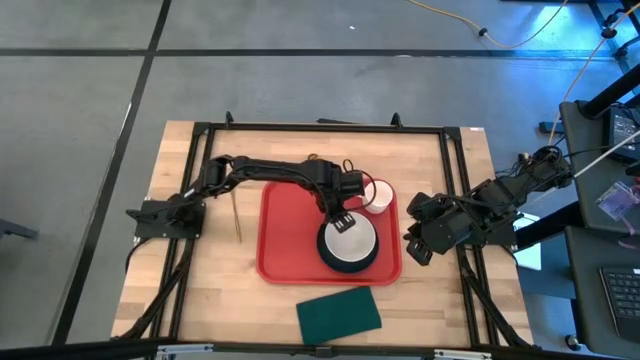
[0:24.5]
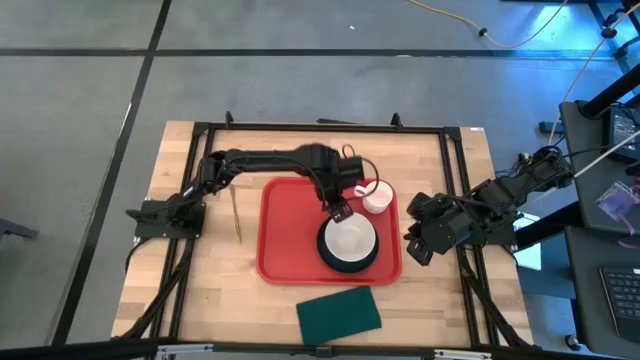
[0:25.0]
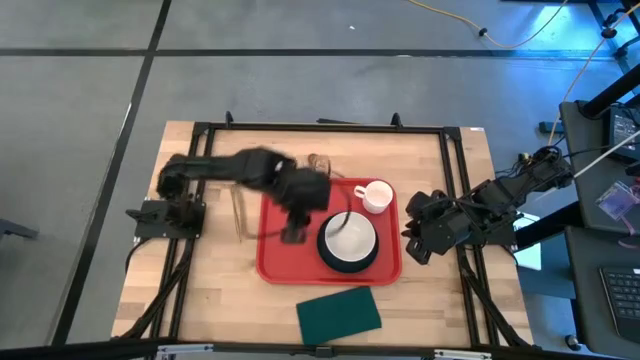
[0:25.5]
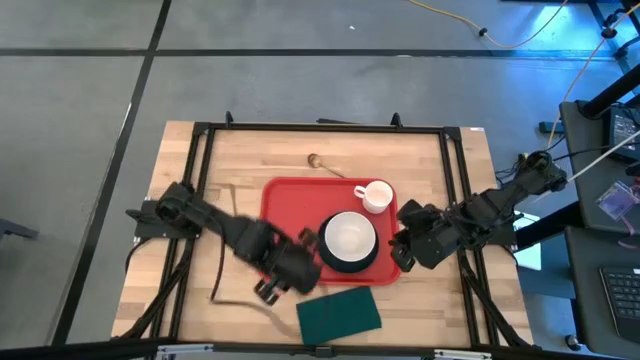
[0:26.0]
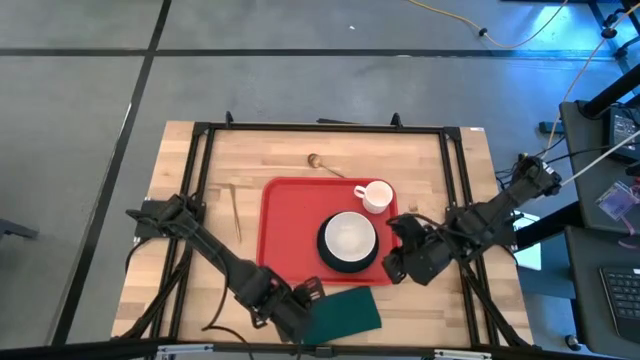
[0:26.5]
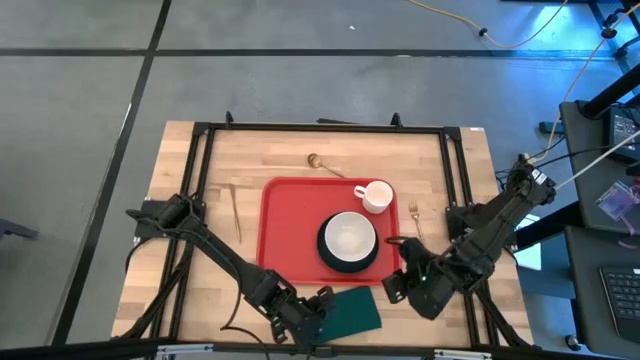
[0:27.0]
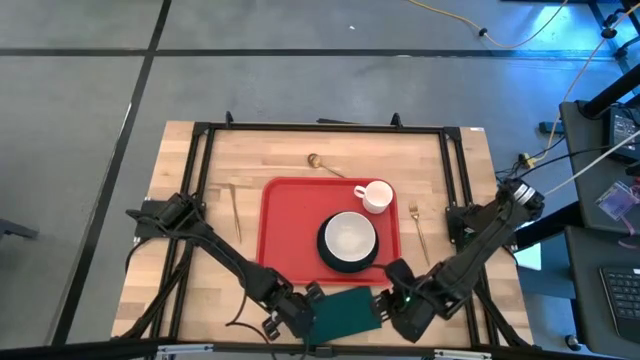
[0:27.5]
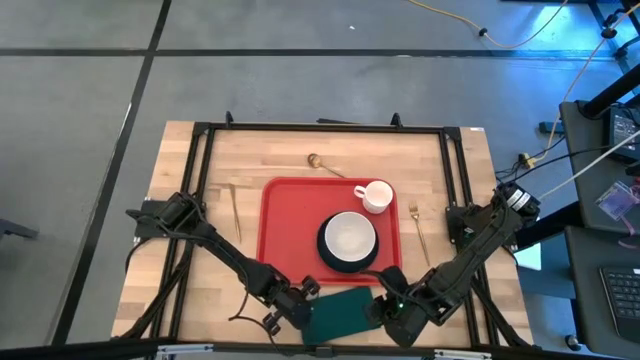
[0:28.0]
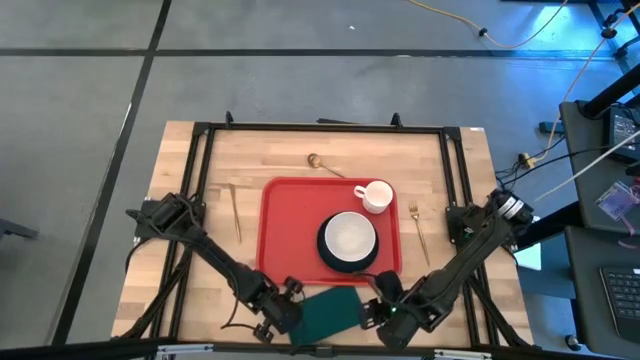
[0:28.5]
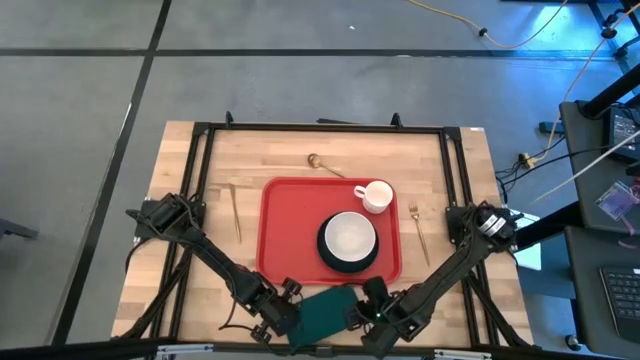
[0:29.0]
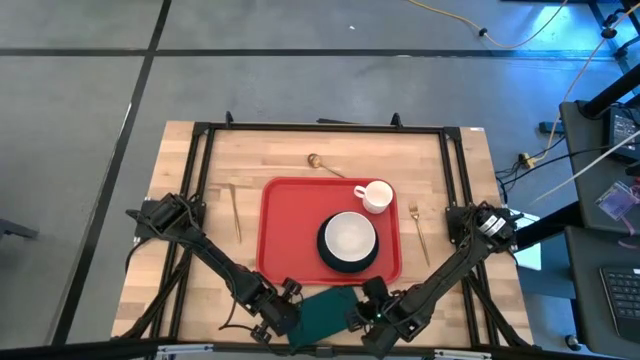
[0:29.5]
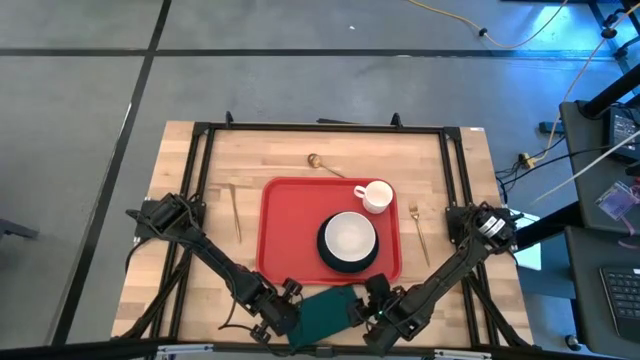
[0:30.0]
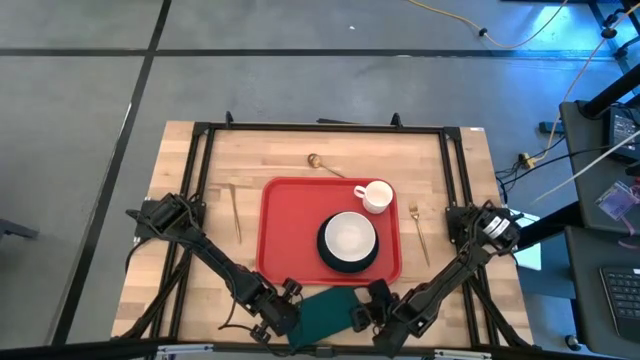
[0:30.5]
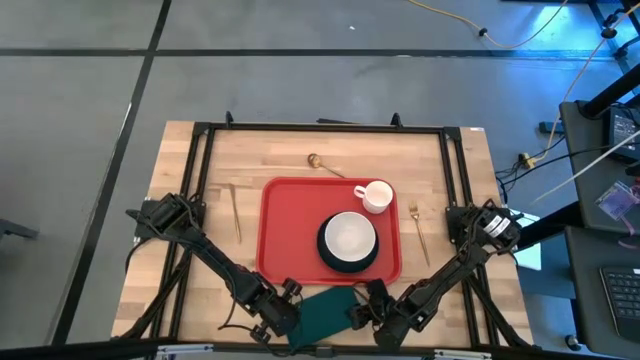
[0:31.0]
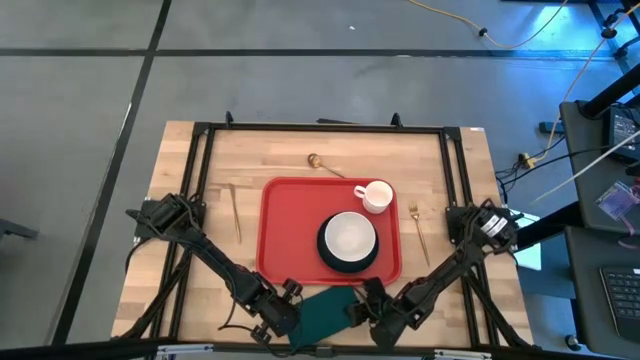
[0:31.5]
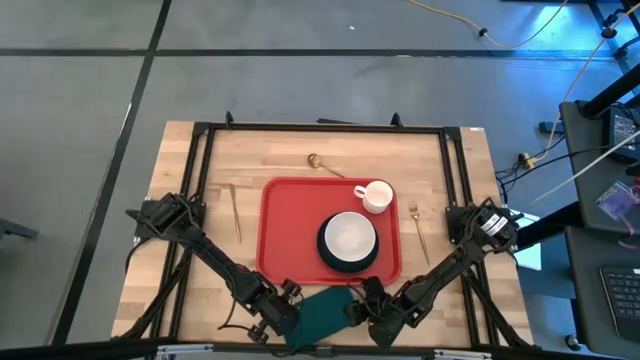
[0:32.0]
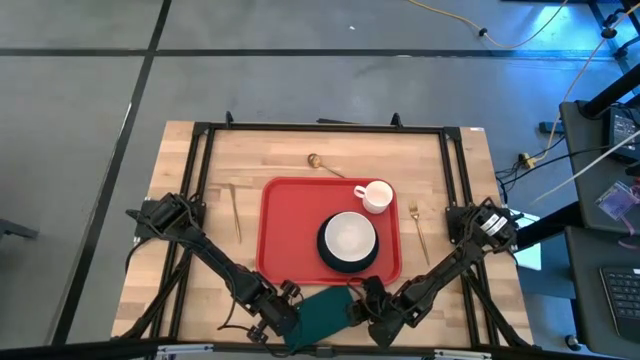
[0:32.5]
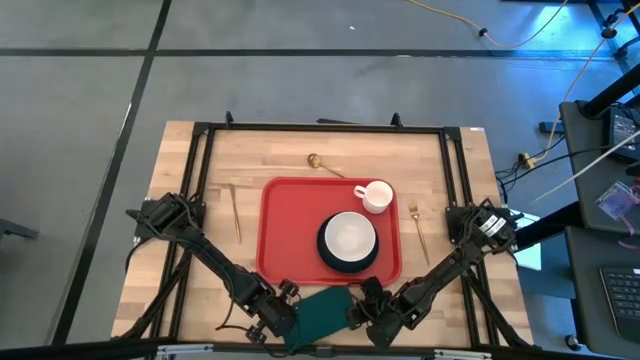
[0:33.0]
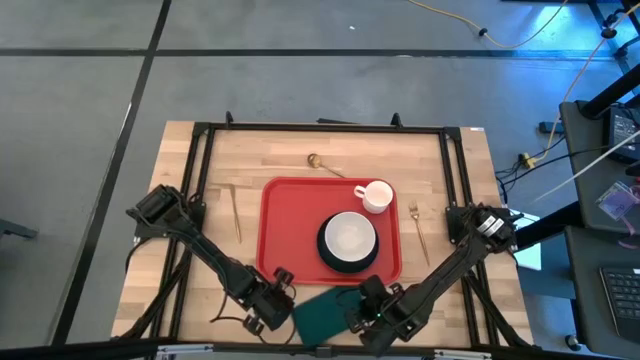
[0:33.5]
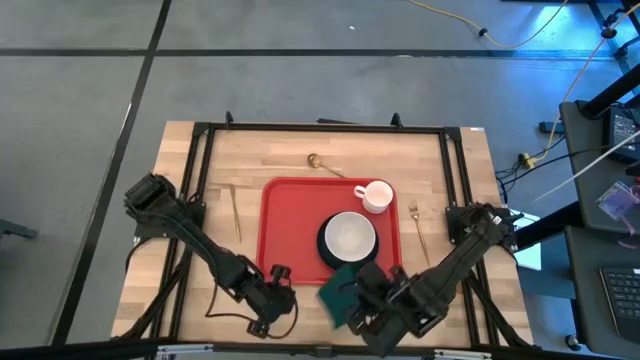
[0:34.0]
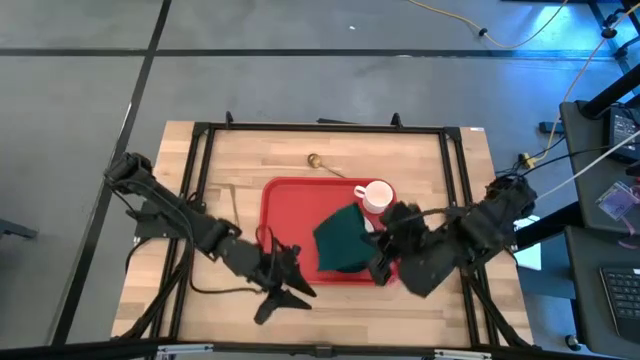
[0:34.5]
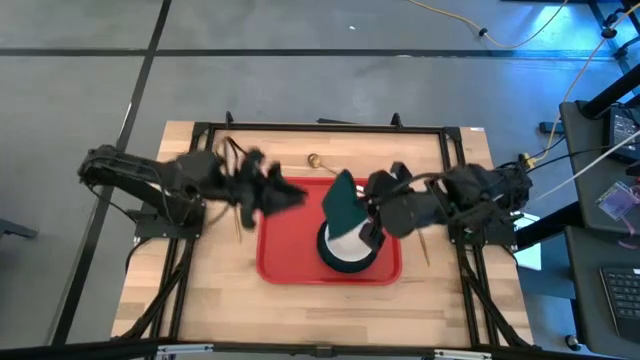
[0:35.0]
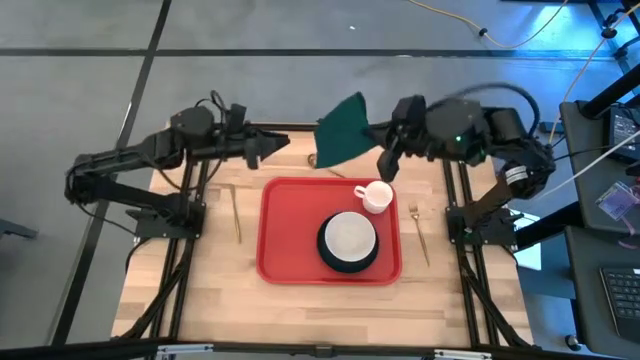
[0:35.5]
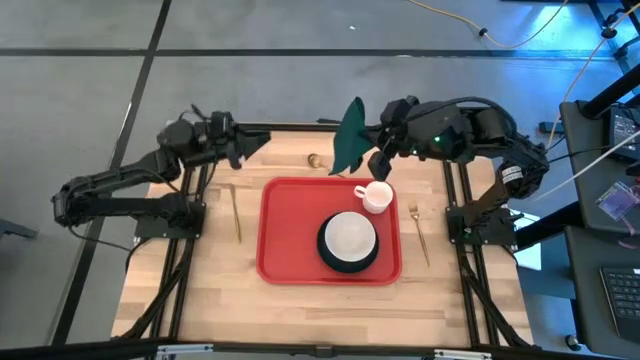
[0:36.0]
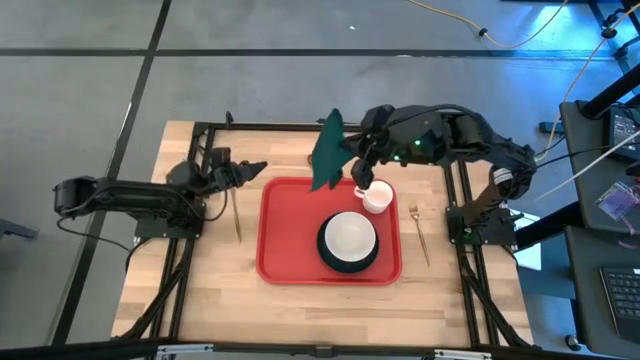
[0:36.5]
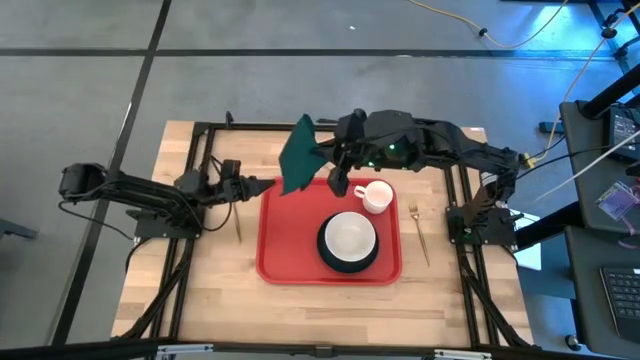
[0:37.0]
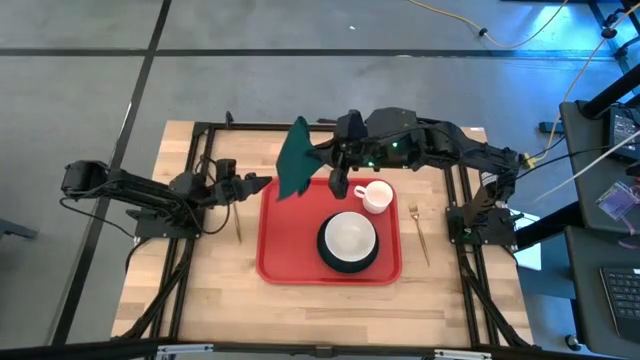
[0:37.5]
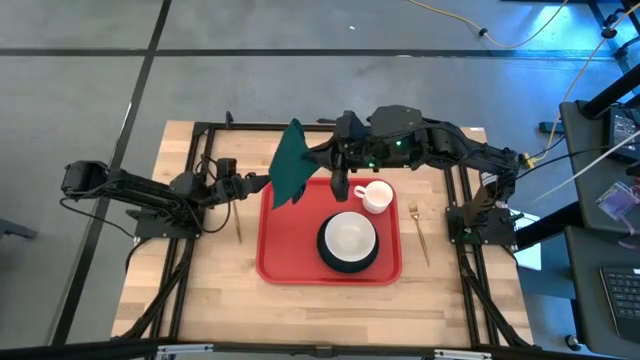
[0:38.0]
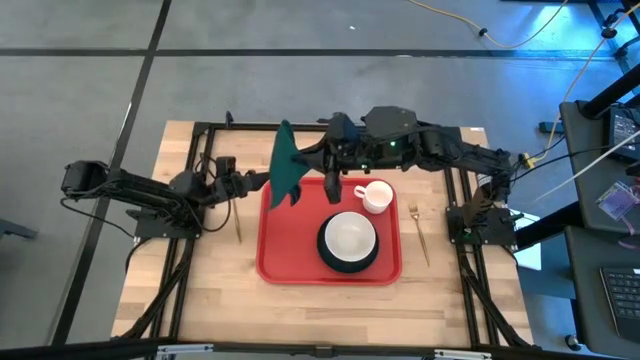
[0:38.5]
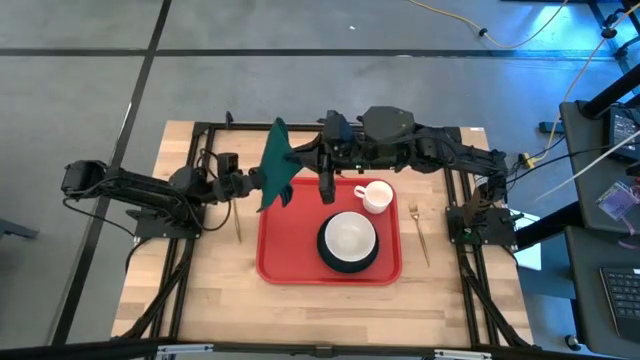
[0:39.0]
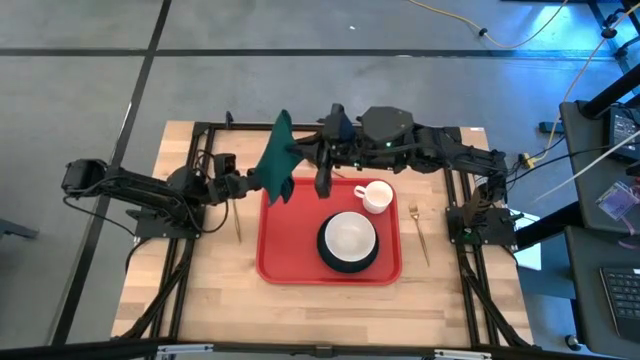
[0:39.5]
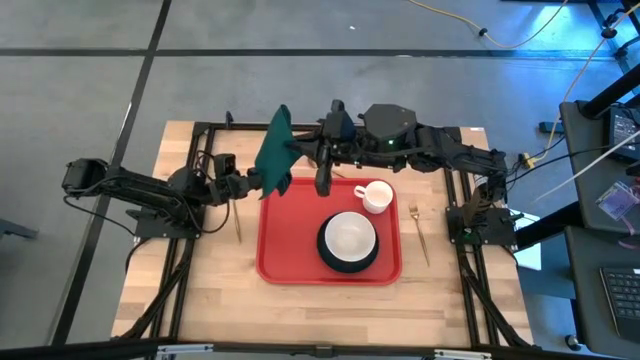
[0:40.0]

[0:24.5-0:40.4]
Task: Set up tray
Put the dark green napkin on the orange tray to the left of the black plate

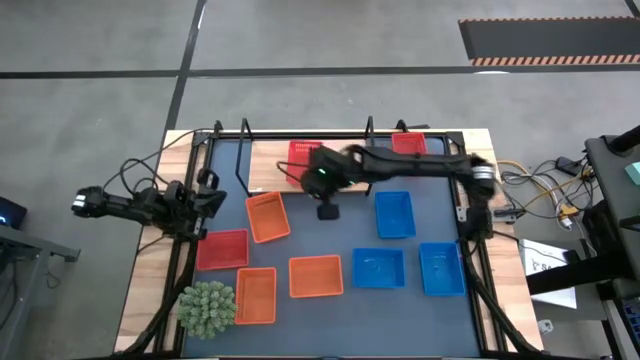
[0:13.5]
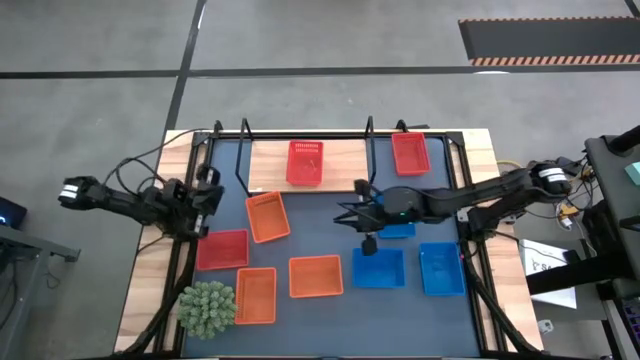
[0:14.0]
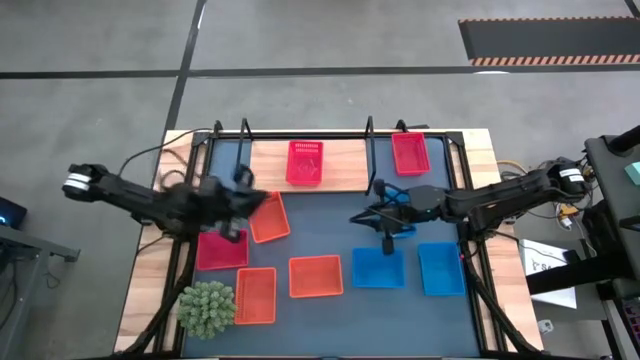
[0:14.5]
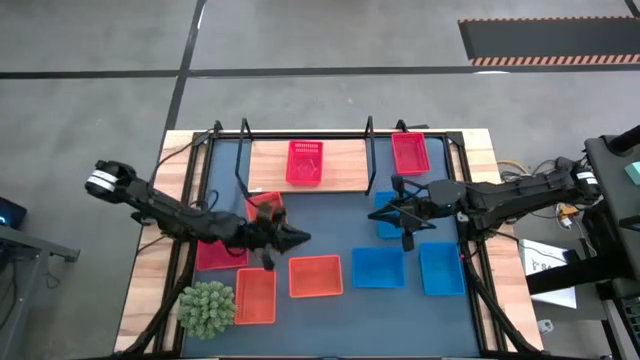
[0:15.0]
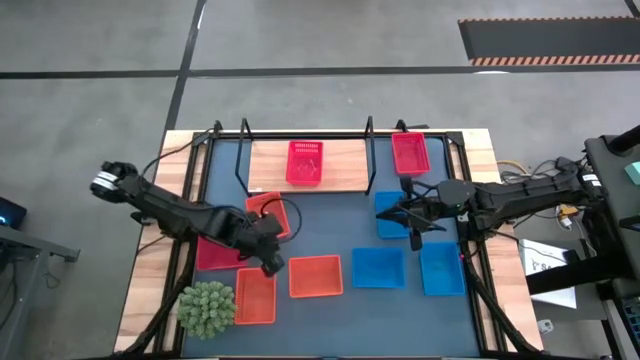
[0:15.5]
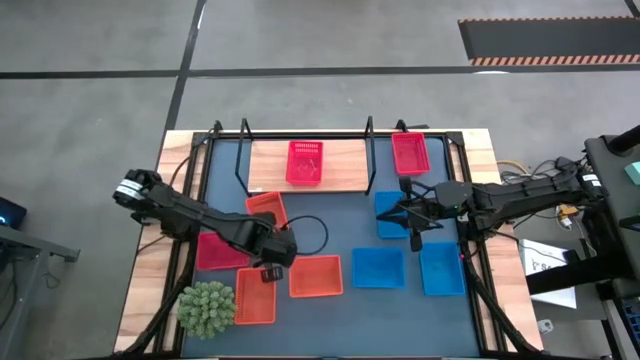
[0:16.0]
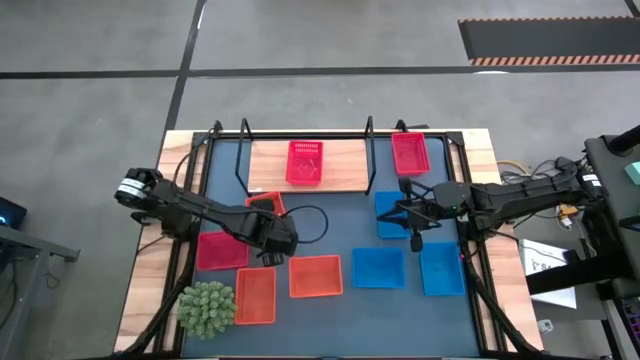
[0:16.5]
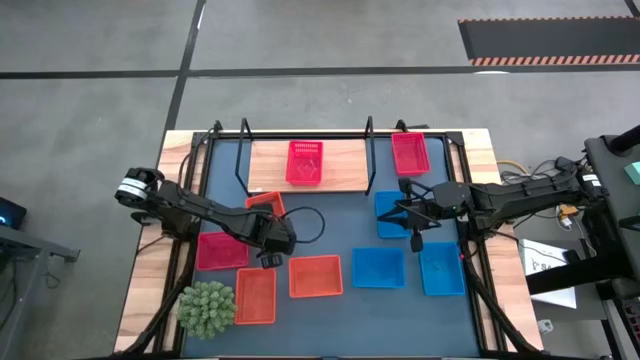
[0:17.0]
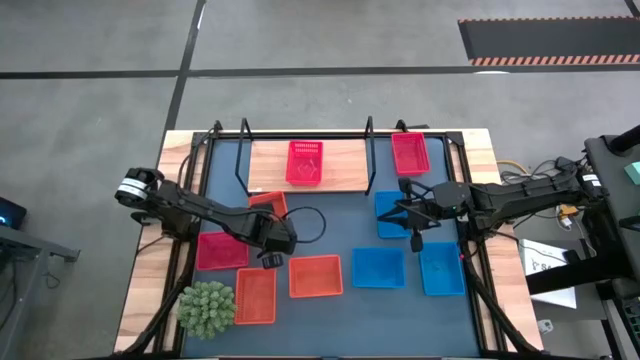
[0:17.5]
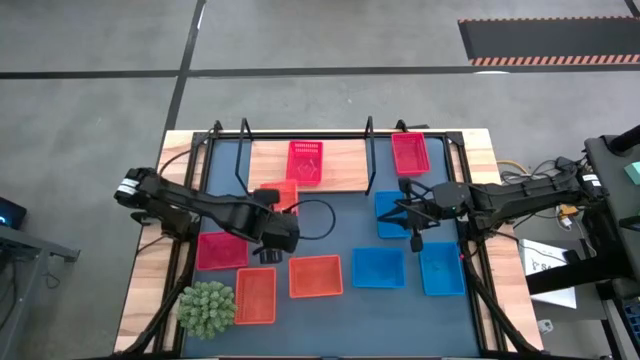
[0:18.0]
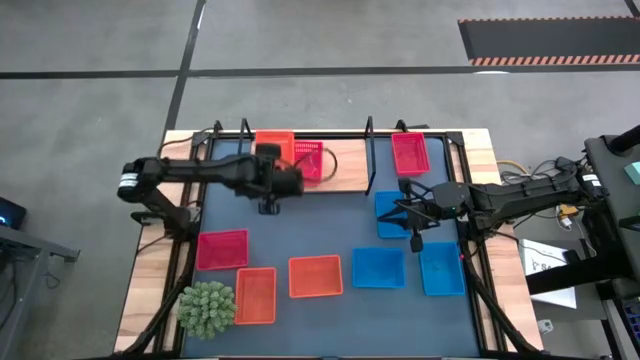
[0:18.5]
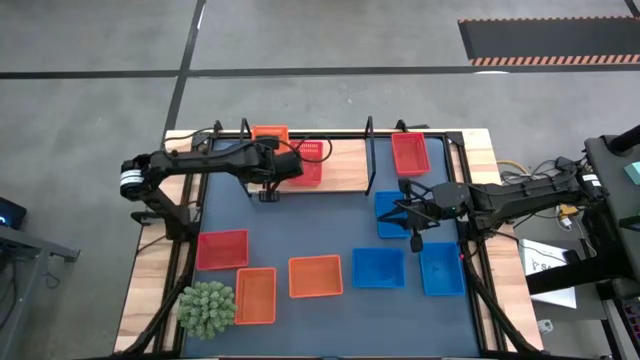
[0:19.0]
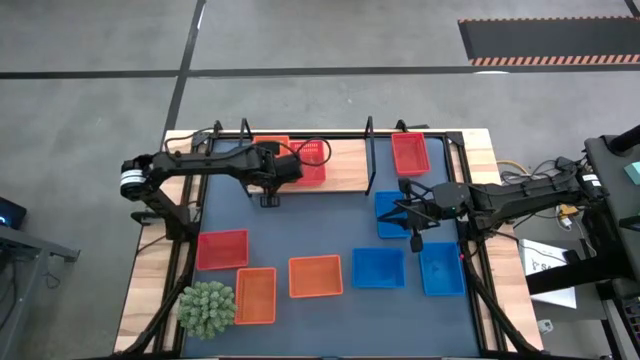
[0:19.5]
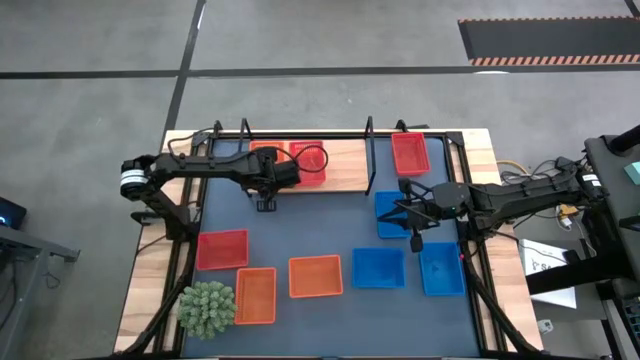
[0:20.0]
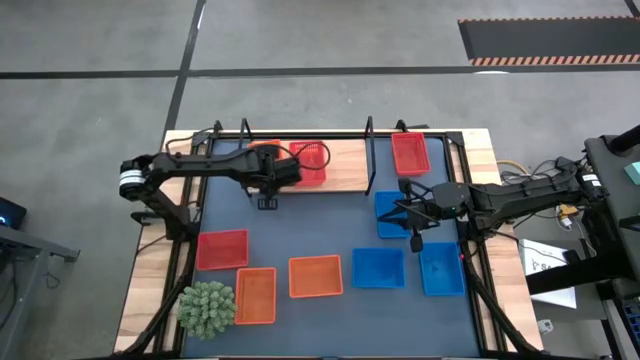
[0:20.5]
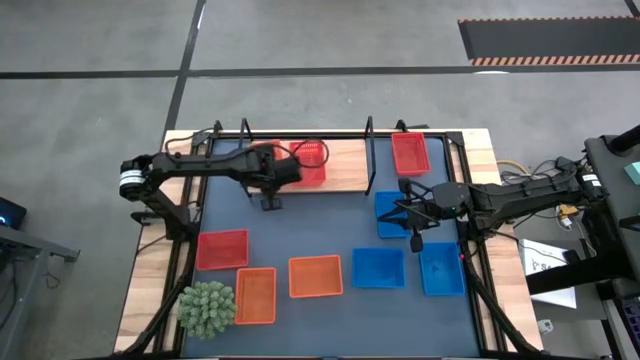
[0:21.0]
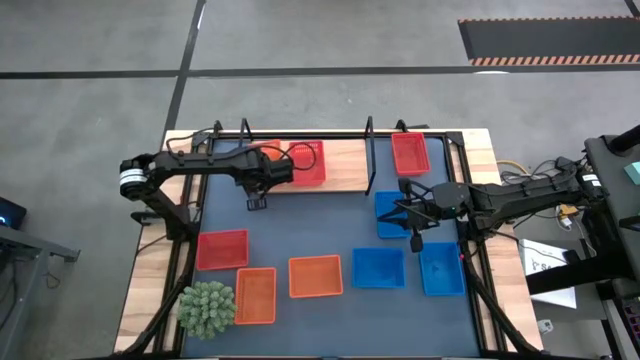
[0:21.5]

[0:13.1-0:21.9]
Task: Stack baskets on shelf by color
Put the top orange basket on the shelf
